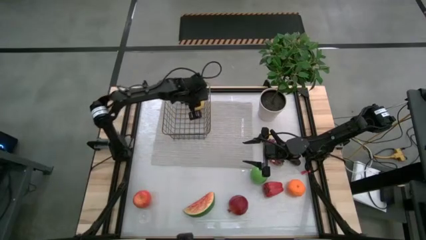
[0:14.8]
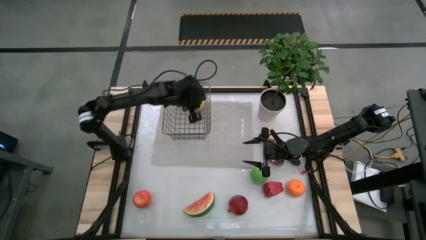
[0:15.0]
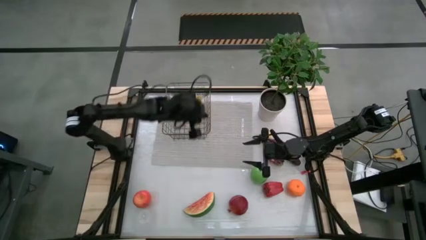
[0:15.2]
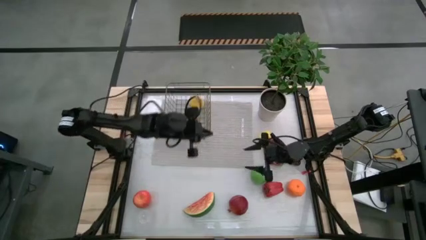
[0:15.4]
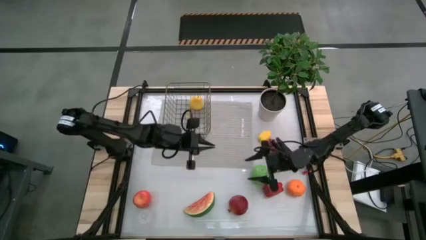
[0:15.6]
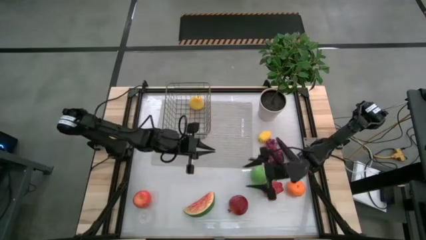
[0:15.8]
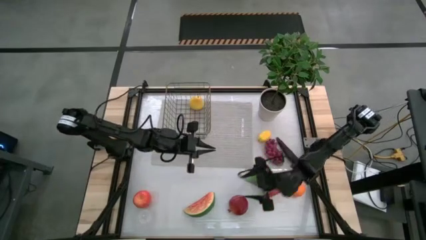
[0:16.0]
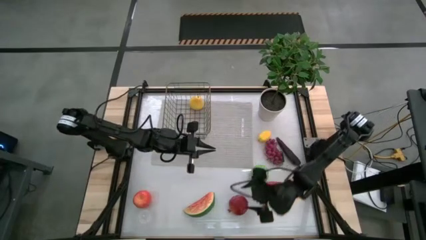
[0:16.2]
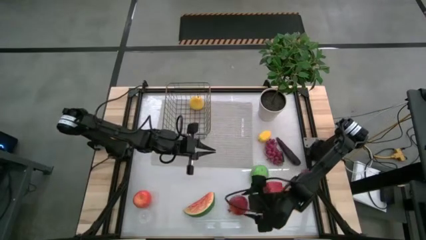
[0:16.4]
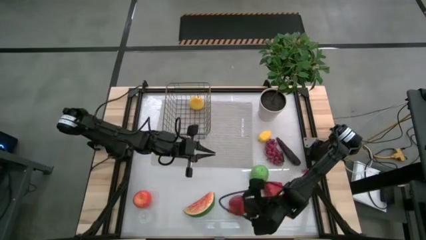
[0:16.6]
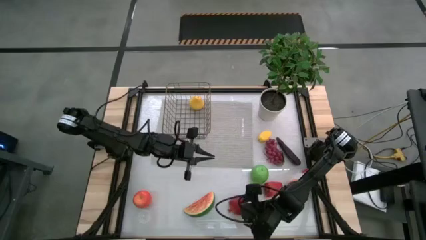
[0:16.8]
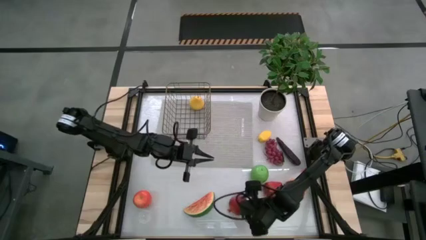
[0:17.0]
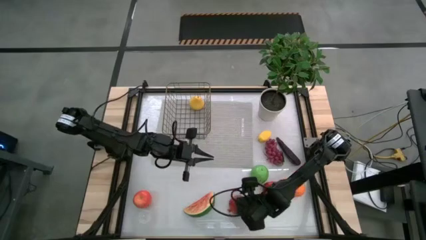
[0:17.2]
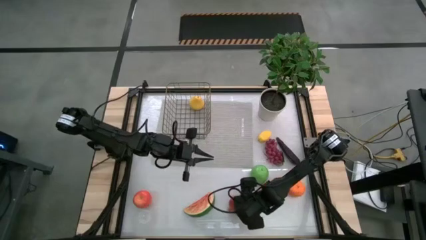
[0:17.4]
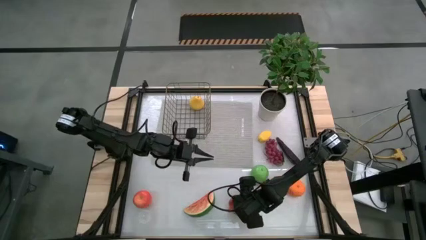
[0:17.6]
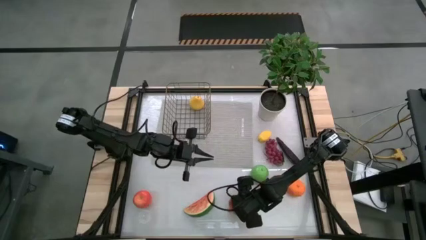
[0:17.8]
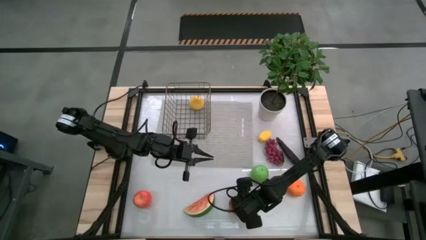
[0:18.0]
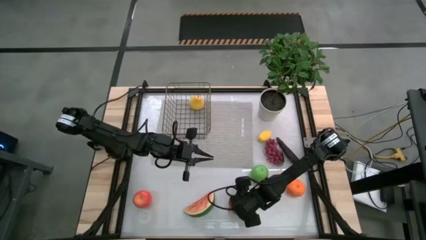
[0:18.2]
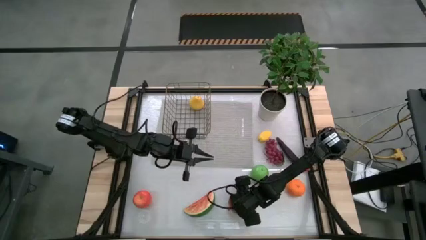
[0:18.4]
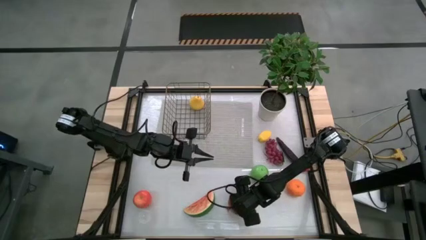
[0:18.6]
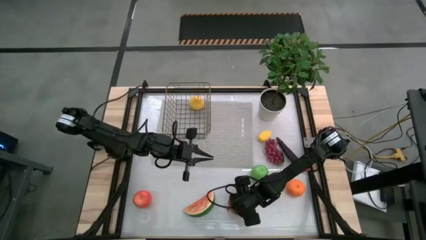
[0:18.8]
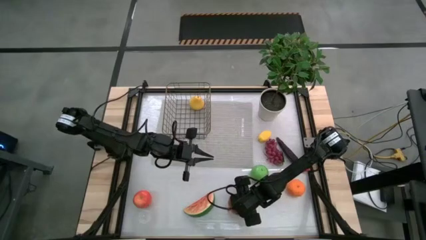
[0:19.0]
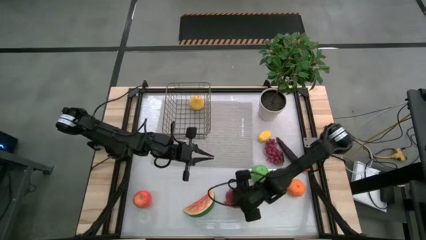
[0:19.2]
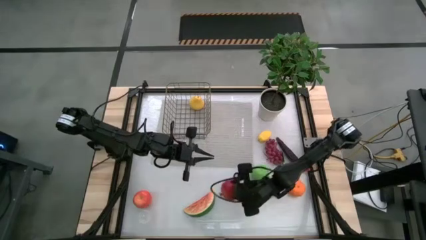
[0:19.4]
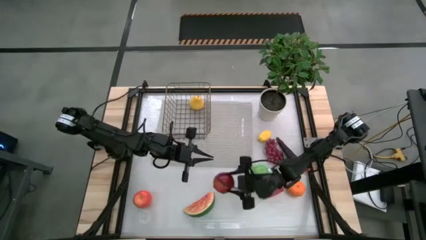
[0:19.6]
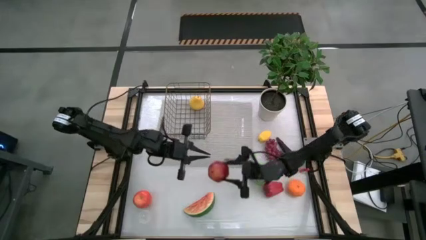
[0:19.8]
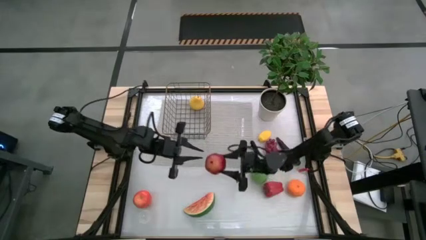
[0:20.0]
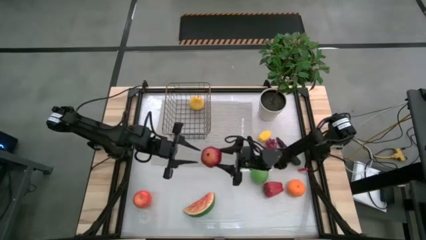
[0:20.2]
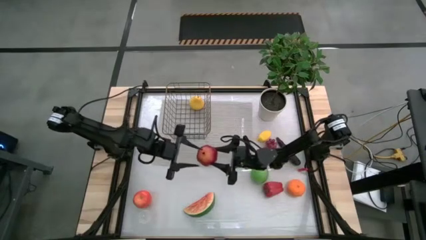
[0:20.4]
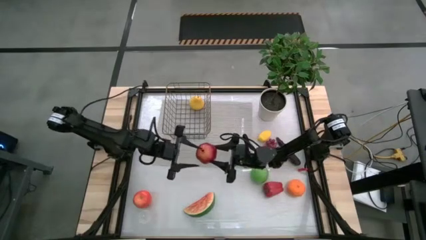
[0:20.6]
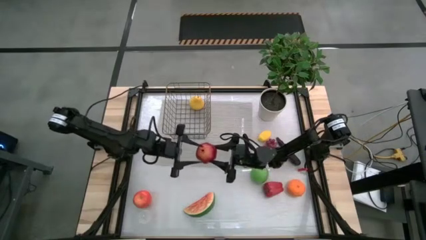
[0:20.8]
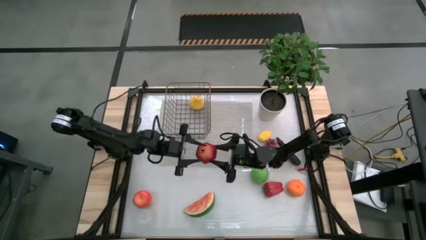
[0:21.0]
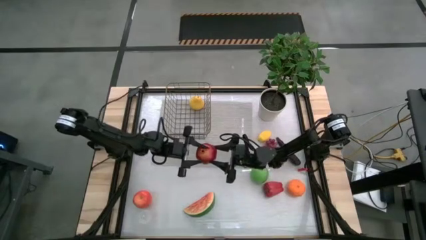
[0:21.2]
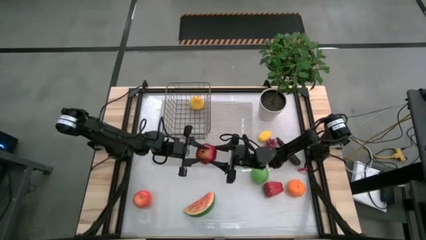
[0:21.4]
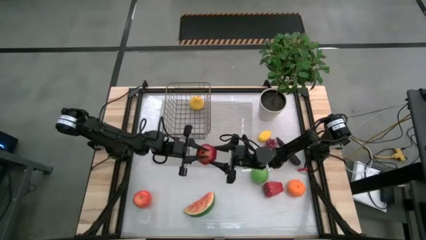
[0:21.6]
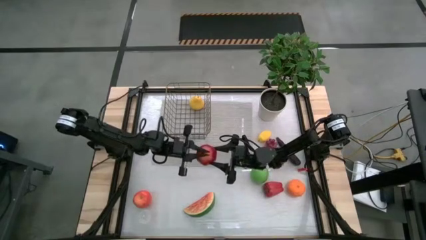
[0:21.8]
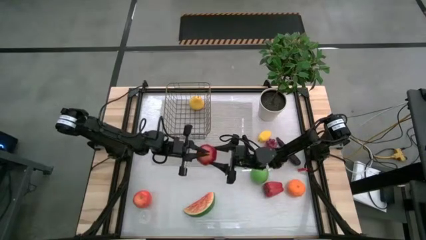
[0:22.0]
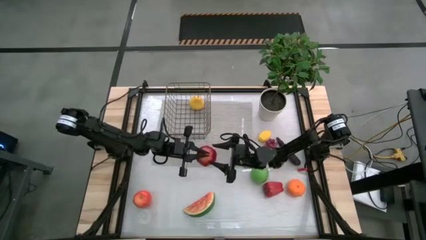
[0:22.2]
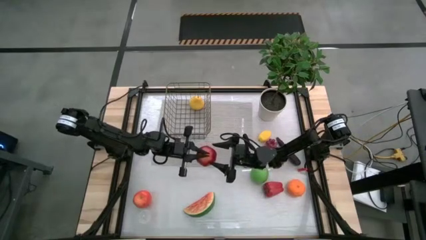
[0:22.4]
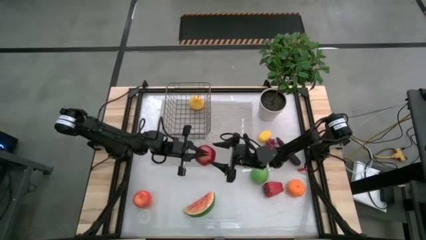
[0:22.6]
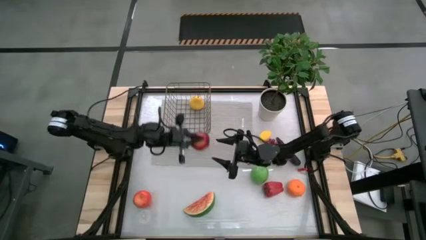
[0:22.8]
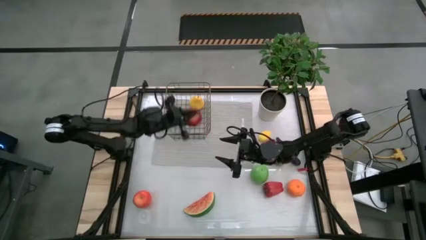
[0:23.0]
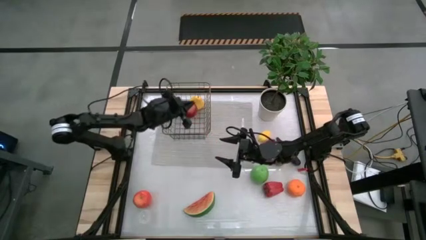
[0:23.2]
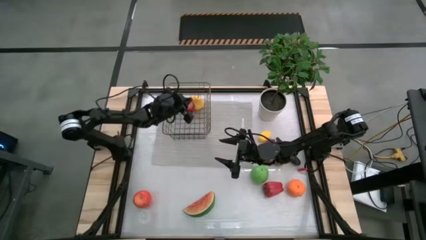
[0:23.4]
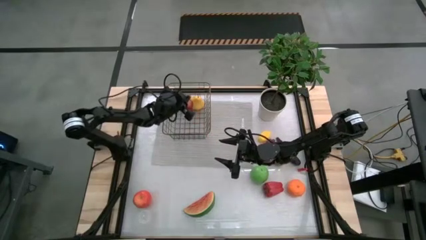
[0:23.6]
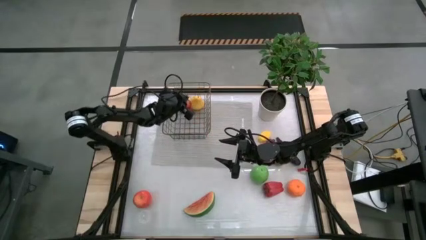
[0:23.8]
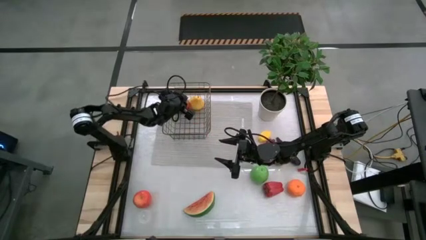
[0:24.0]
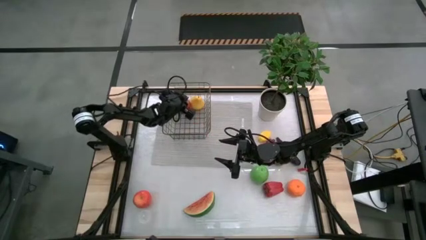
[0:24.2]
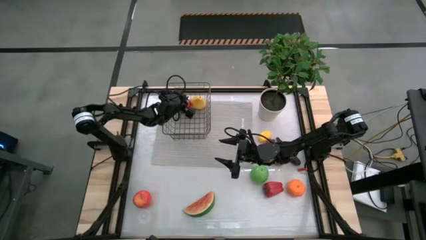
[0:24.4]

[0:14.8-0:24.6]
Task: Build produce basket
Put the red pomegranate into the brown wire basket
